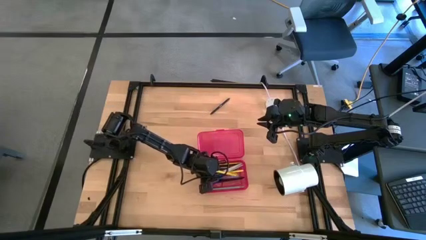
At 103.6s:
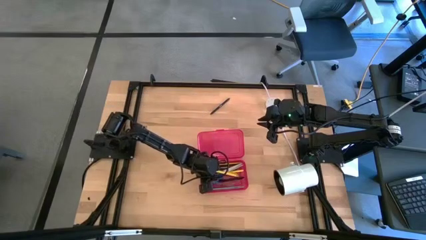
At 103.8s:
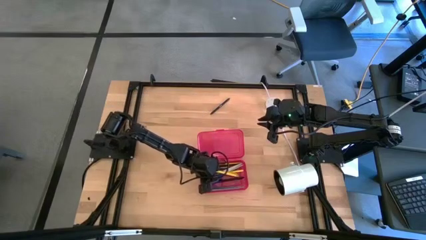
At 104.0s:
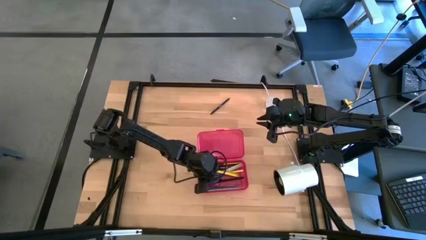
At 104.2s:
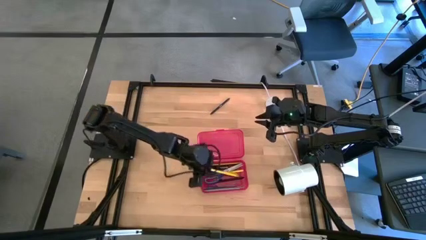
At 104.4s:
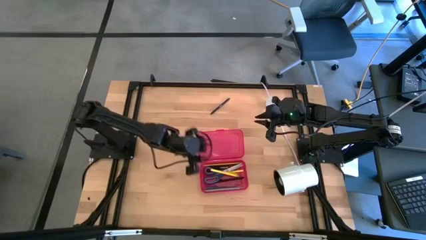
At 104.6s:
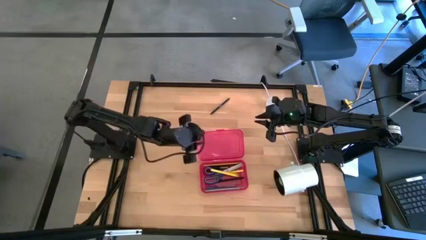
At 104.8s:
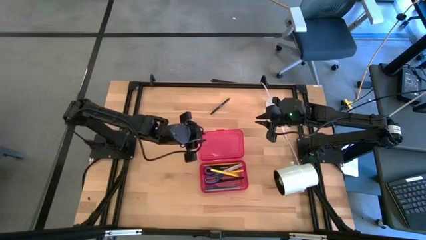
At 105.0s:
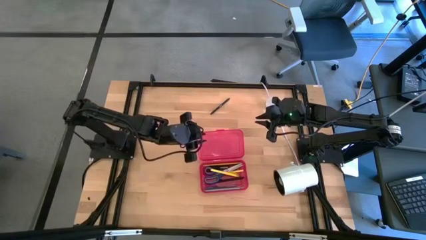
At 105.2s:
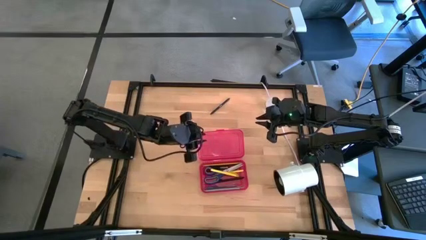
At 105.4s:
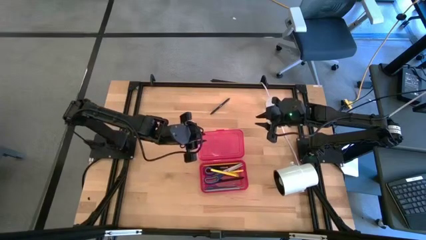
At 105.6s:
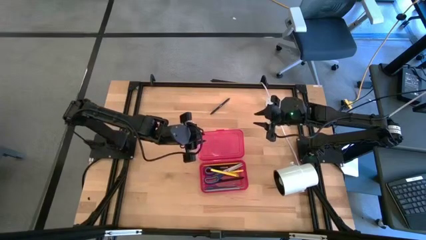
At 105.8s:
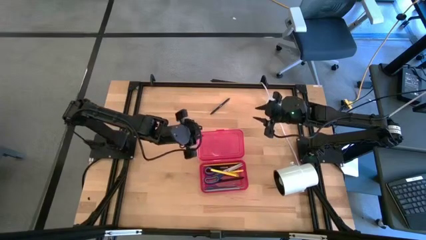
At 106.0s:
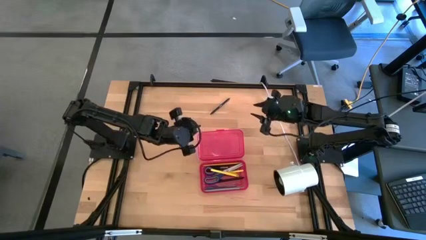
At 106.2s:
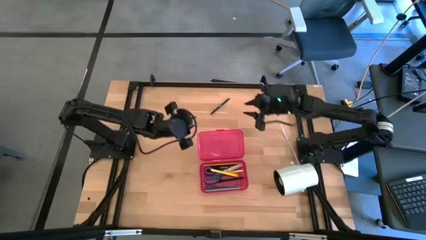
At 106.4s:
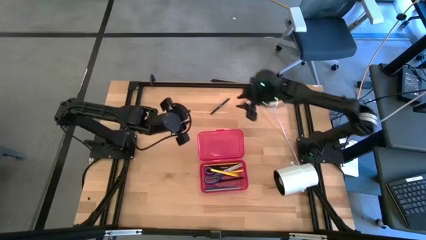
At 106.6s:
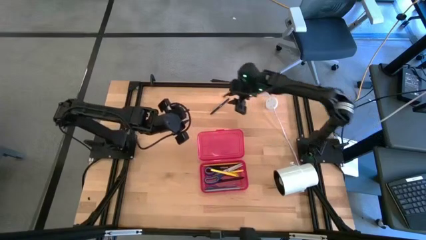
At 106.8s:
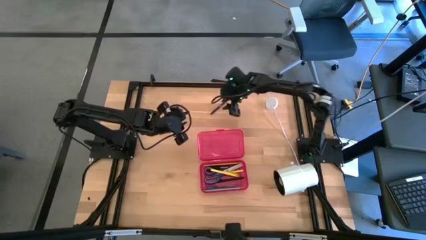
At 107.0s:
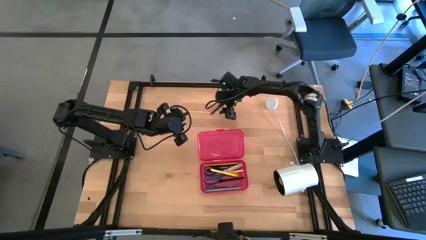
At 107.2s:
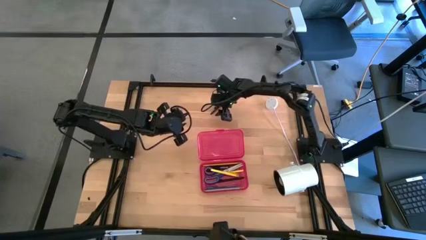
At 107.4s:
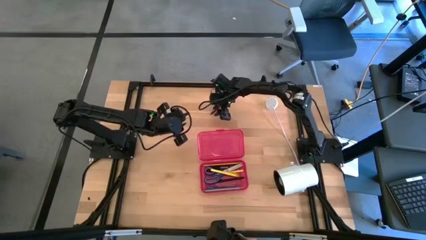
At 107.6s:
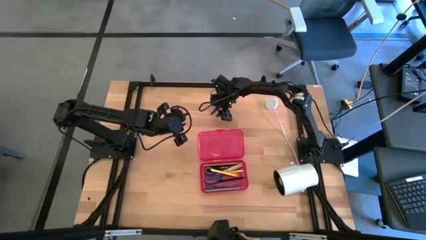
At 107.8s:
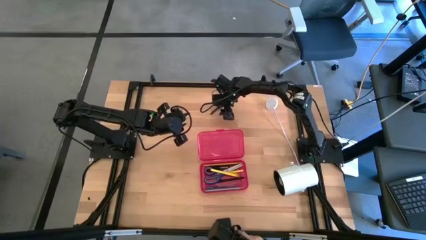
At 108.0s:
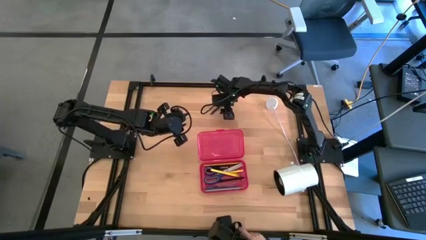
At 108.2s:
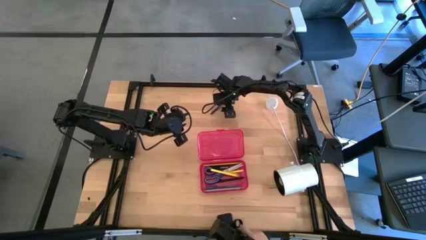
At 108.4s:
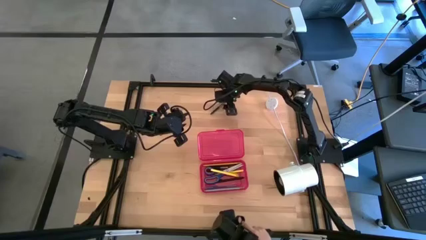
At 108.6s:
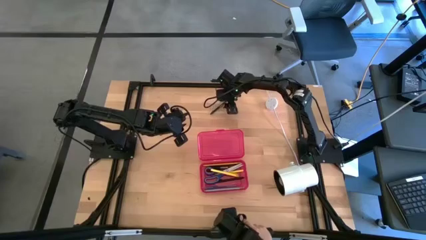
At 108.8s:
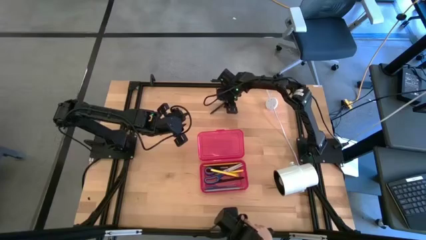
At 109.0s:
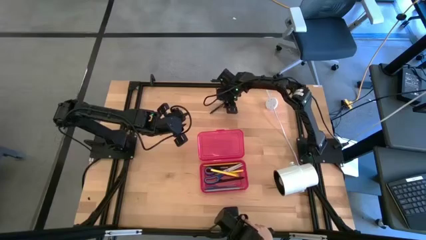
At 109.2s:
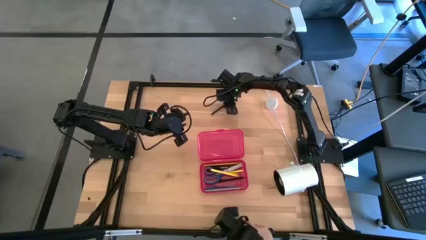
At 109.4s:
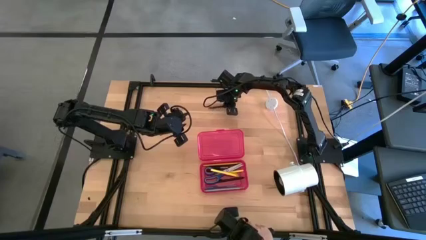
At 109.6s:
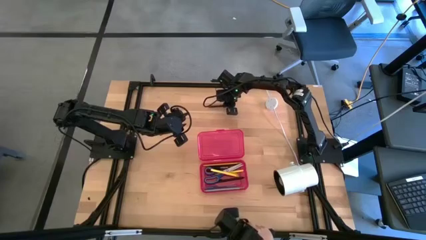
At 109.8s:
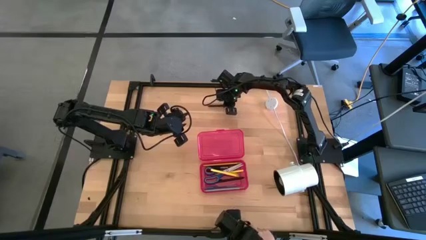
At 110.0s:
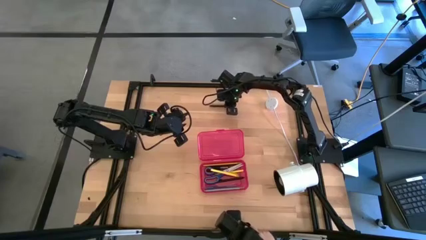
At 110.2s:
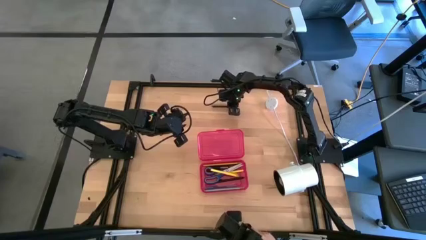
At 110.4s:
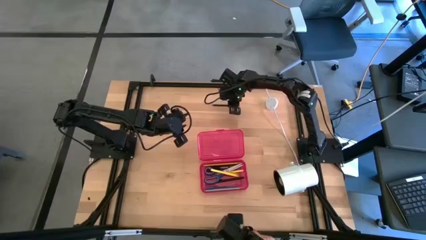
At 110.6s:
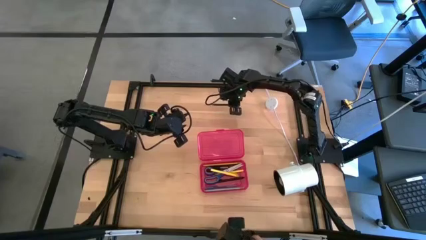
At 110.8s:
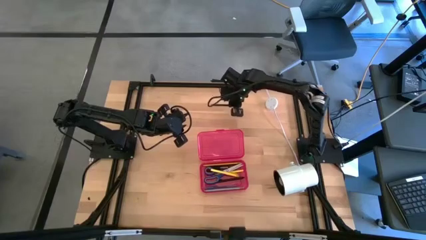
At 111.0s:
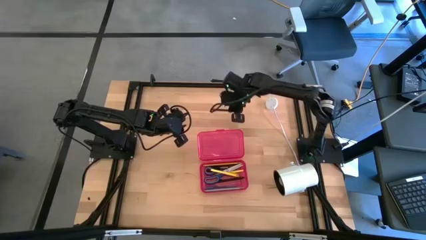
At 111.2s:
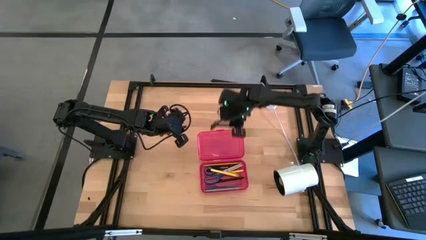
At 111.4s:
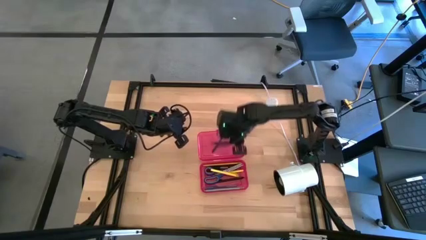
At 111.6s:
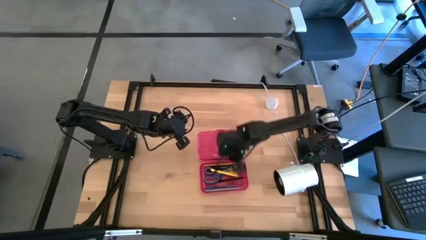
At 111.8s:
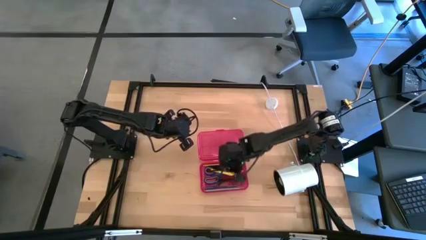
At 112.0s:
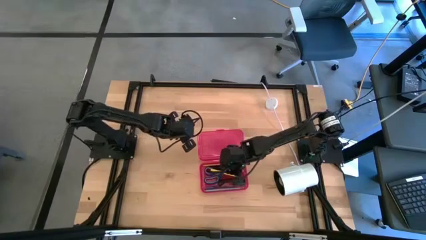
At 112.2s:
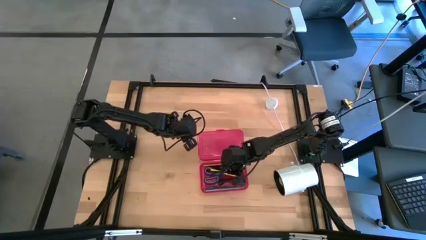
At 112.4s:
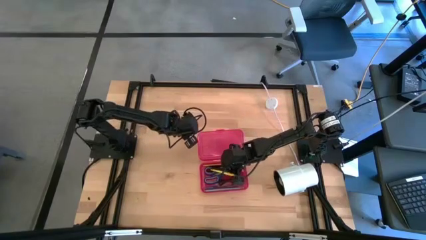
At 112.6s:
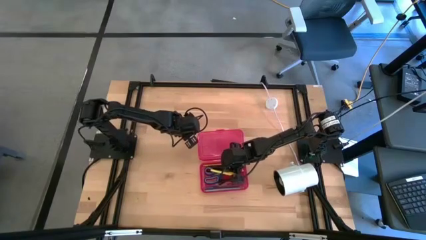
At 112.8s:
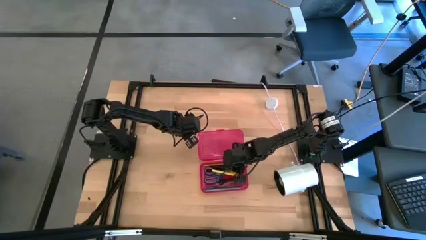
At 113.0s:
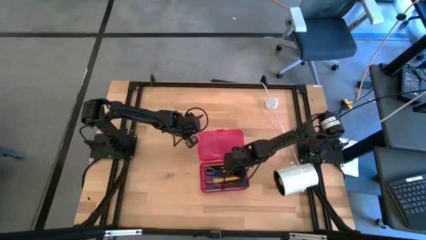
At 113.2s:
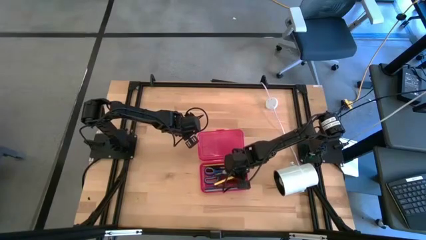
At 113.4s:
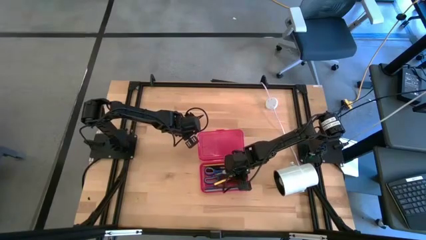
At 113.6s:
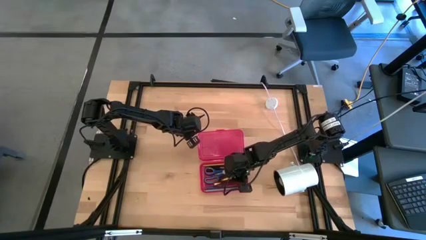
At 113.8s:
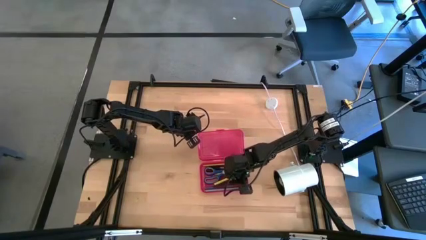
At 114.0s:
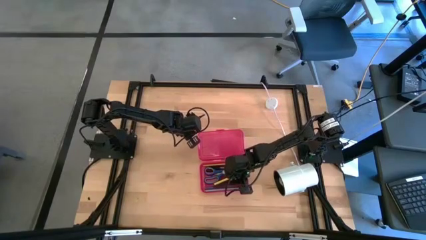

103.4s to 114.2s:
Task: Pick & place school supplies into a supply box
Put the black pen into the red supply box

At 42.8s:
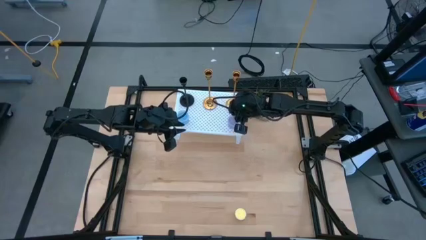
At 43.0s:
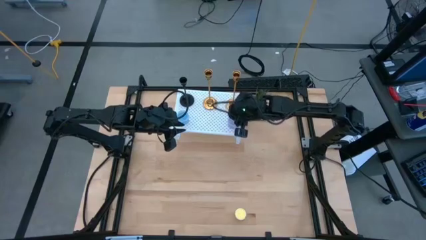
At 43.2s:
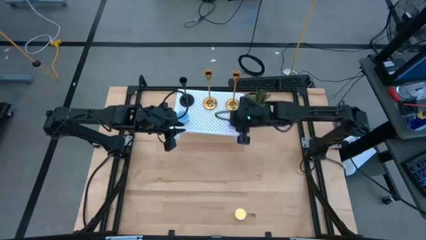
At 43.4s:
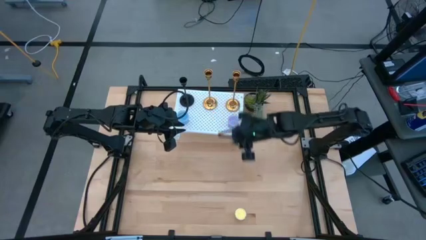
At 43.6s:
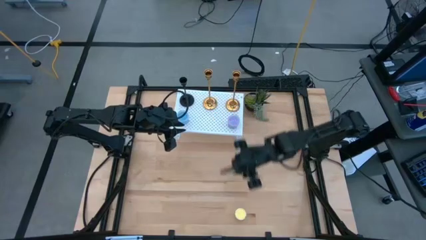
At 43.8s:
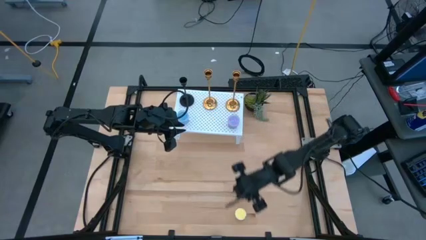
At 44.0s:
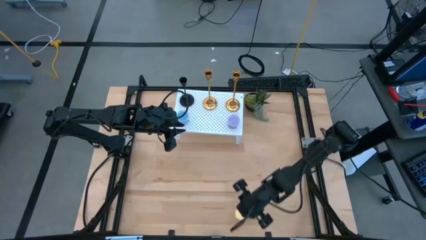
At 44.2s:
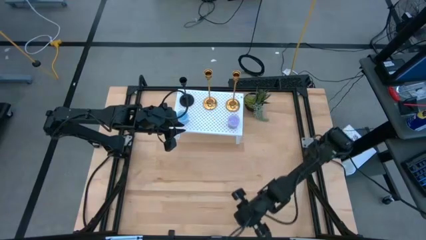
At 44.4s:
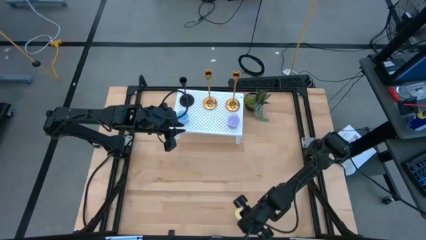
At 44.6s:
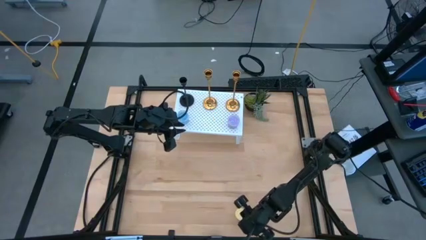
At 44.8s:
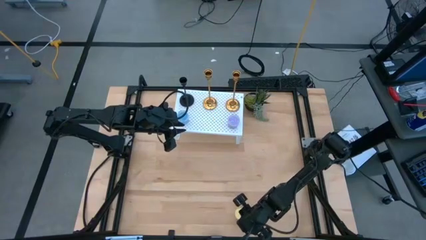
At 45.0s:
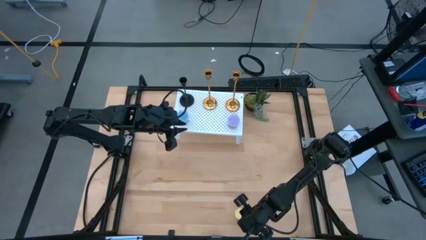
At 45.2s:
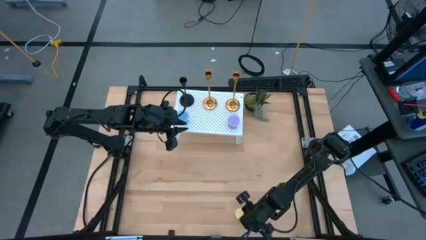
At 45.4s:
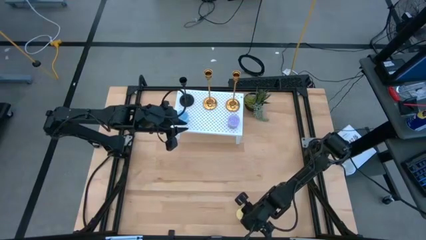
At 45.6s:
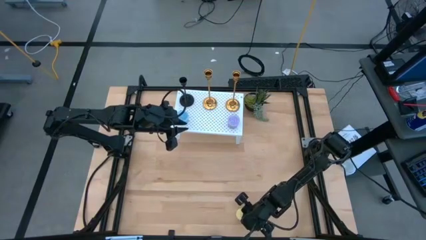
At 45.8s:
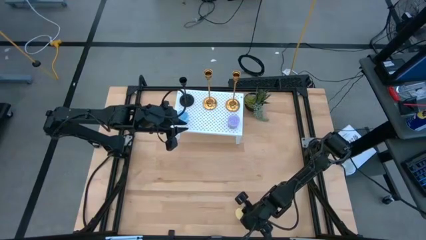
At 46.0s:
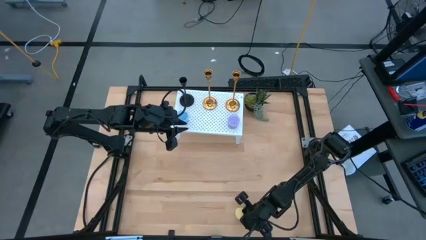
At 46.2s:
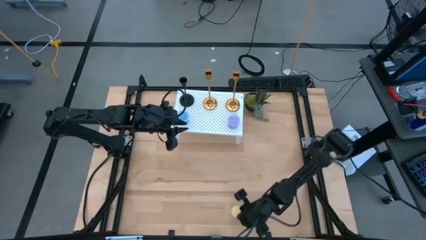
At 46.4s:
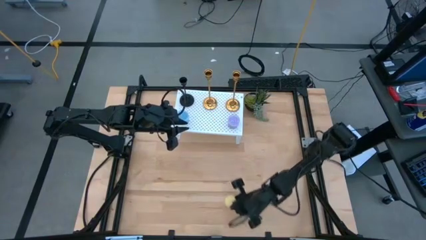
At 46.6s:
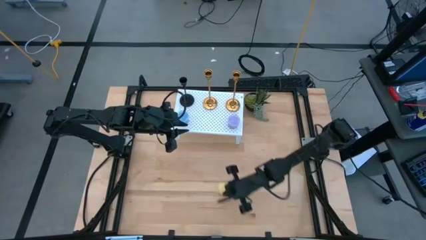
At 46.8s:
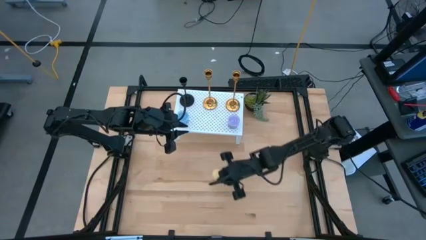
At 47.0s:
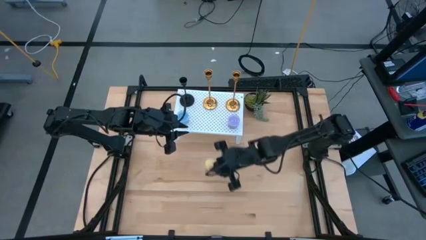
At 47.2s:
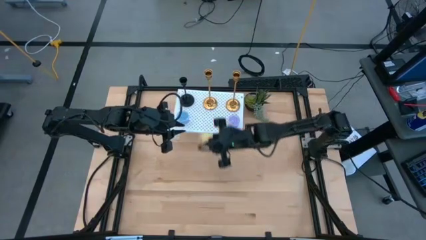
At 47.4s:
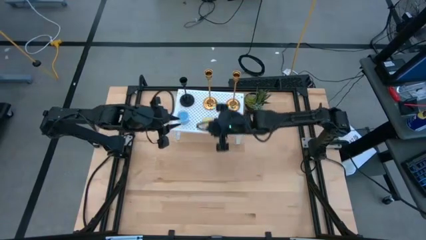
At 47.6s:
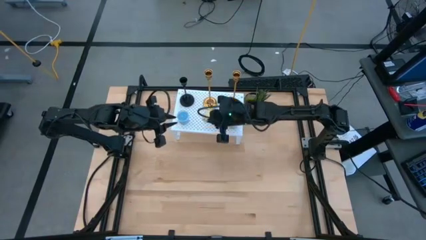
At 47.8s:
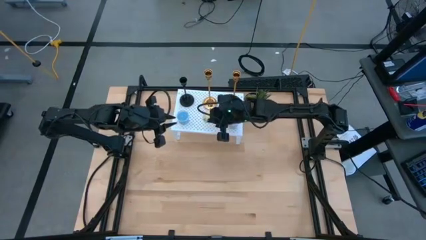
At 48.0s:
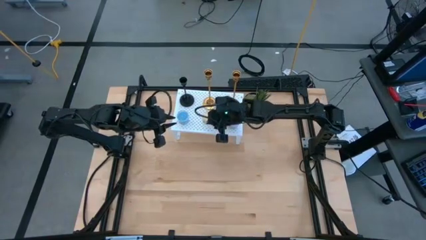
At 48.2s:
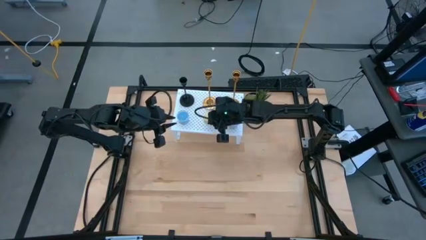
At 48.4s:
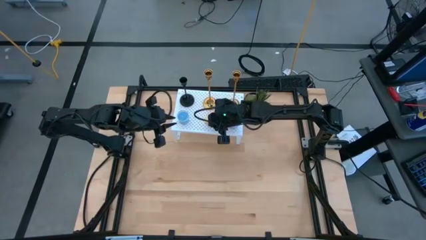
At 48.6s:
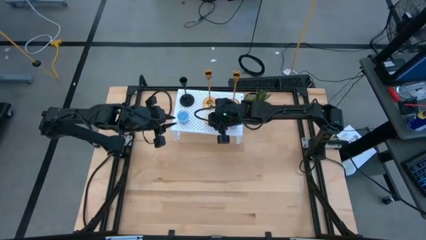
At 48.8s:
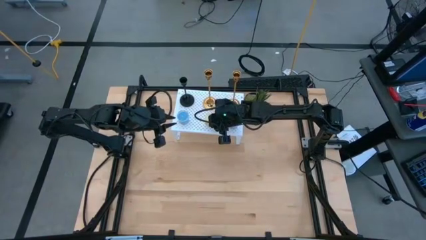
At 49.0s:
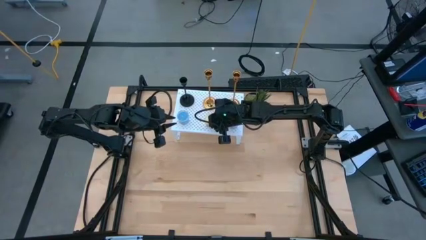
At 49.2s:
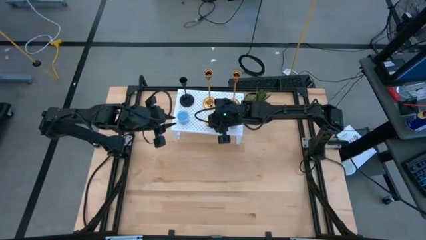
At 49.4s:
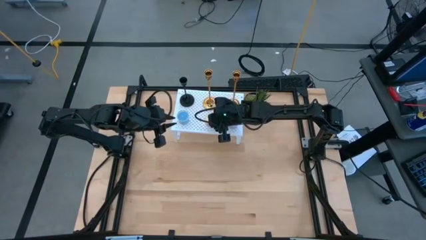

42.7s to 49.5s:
Task: Pick & Place candle stick holders
Put the yellow candle on the shelf
